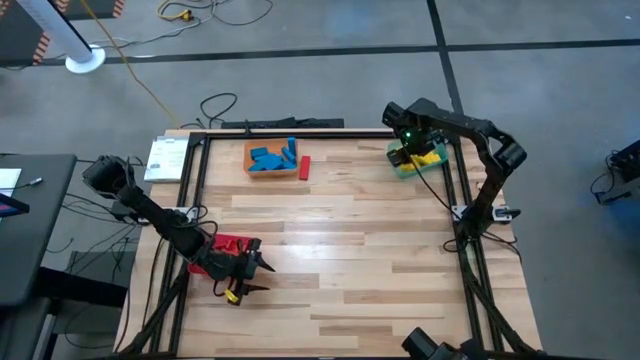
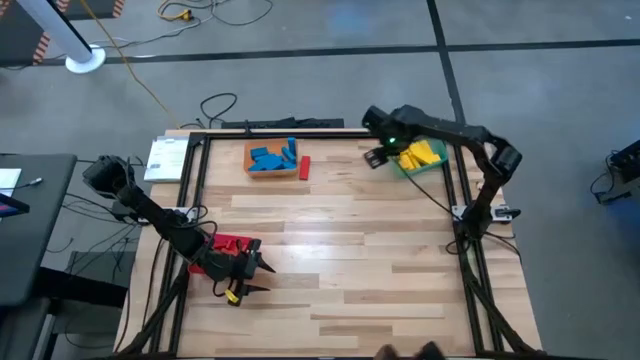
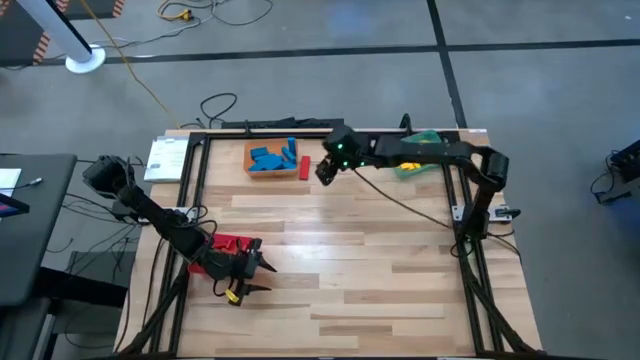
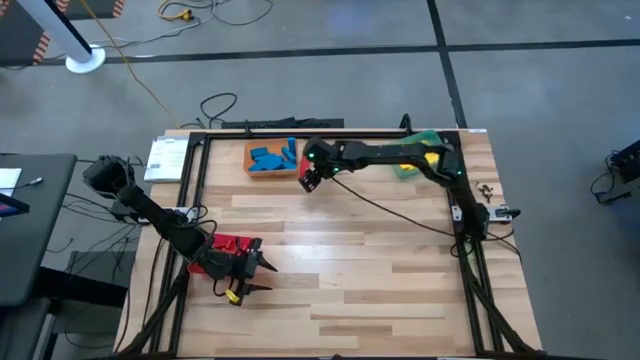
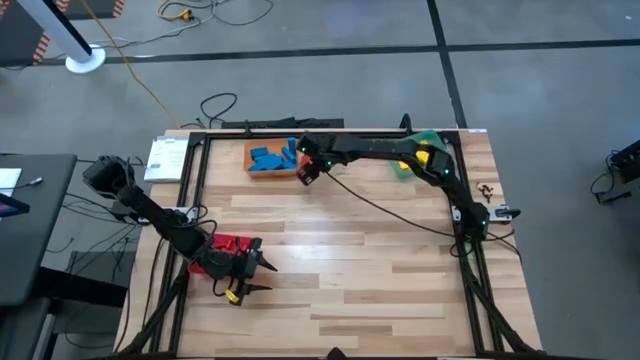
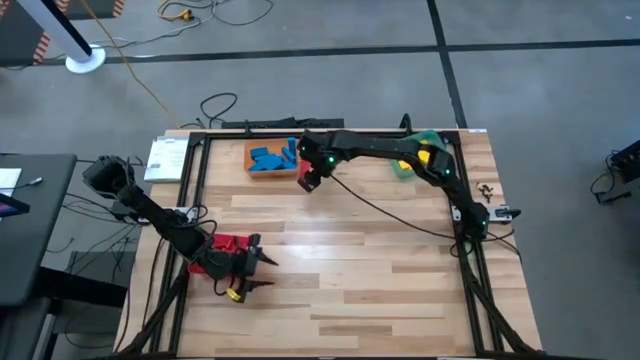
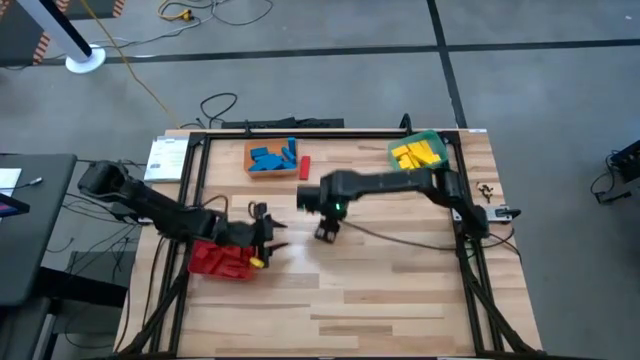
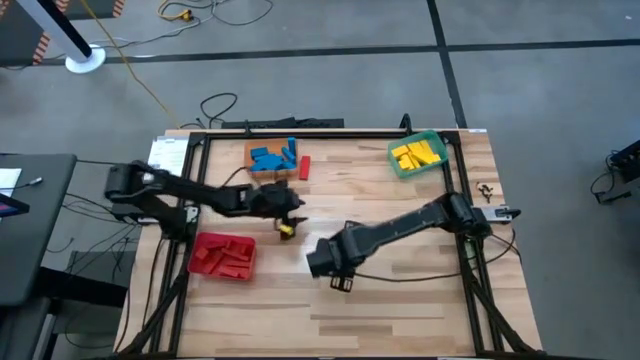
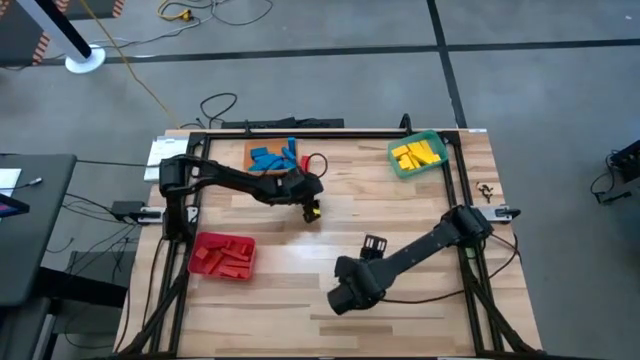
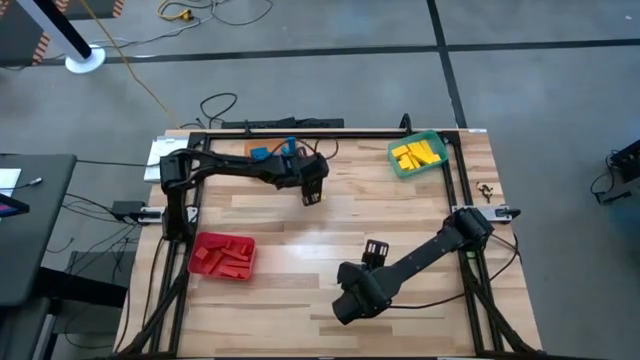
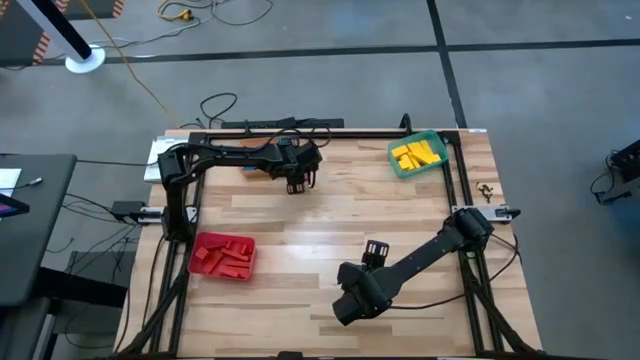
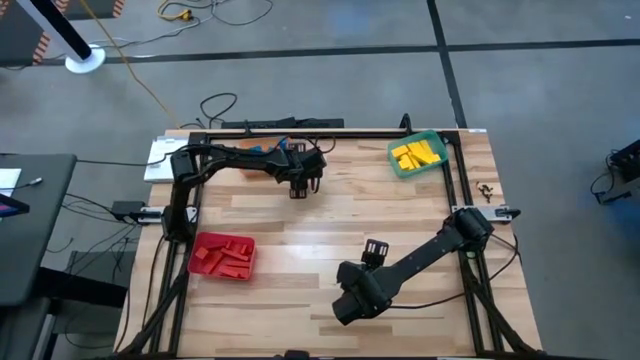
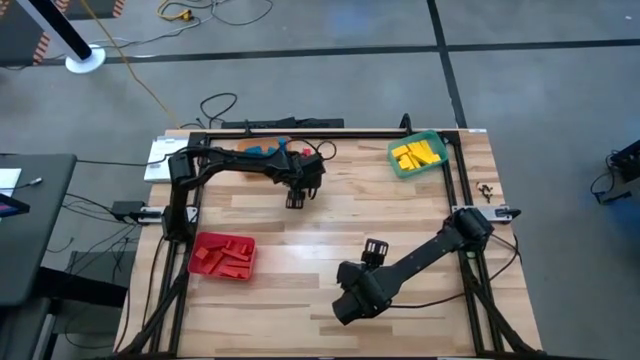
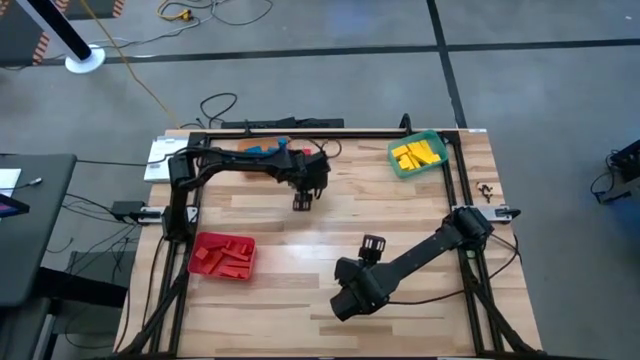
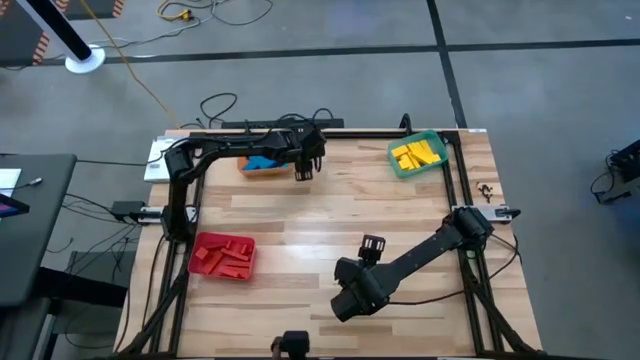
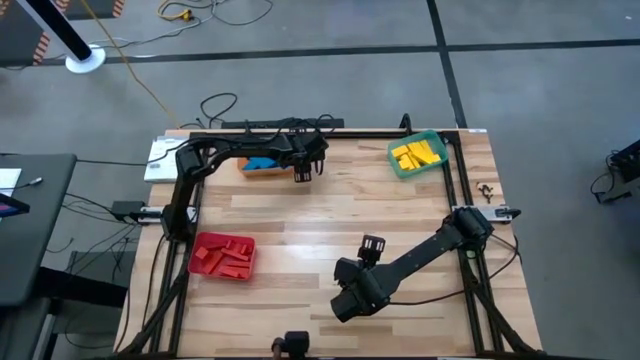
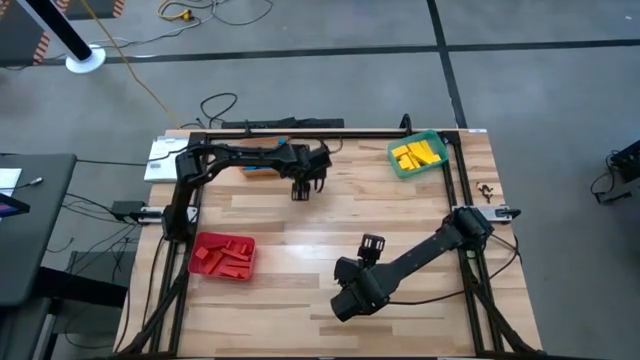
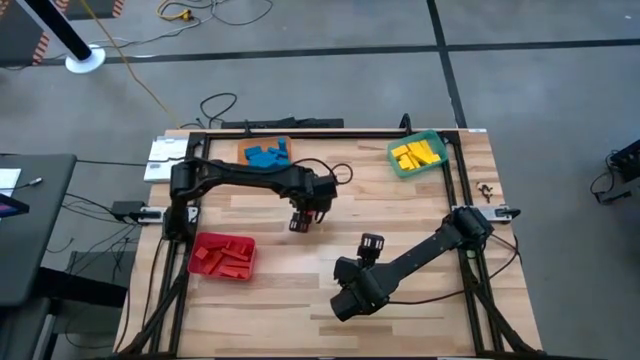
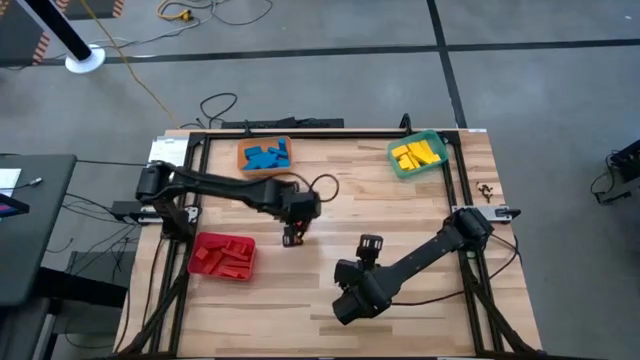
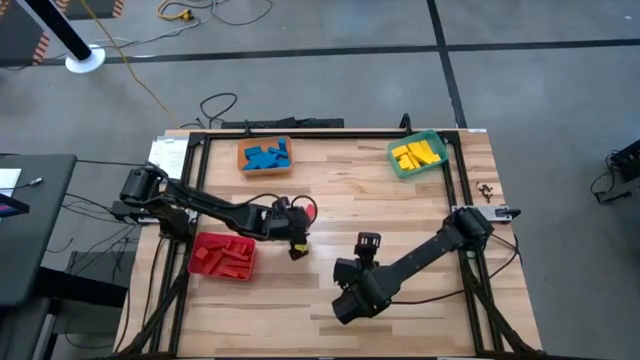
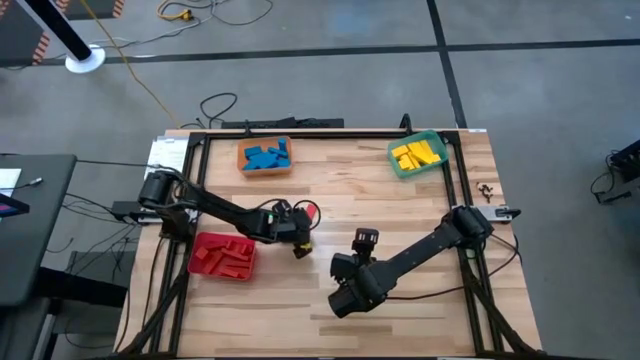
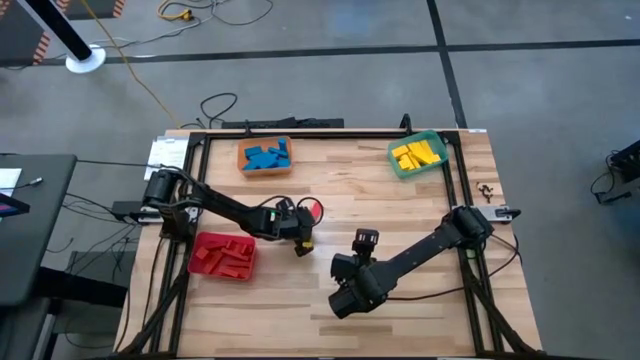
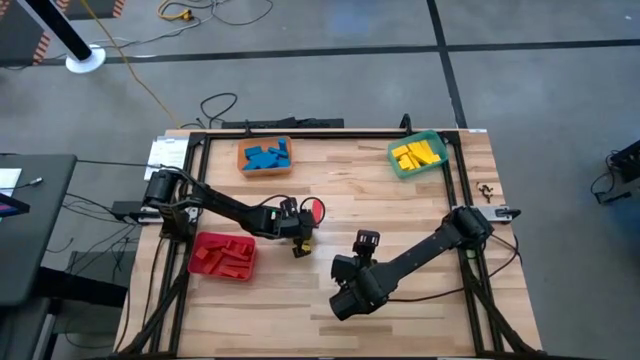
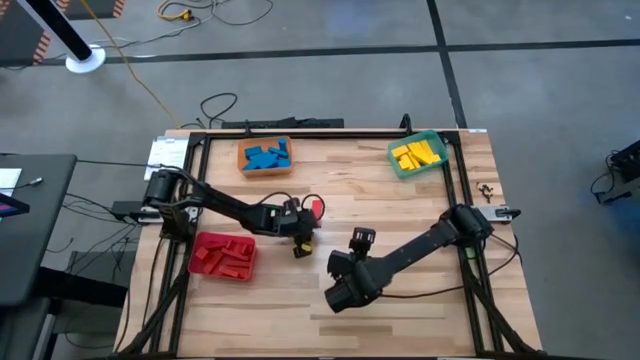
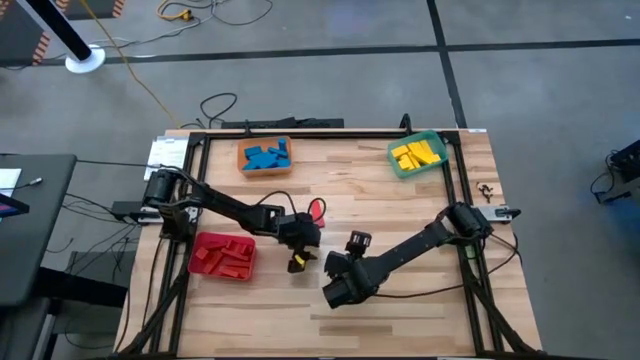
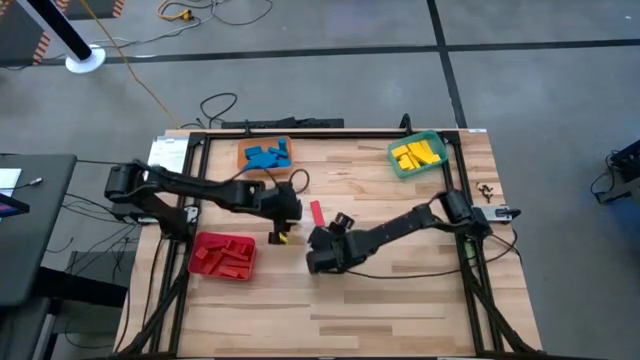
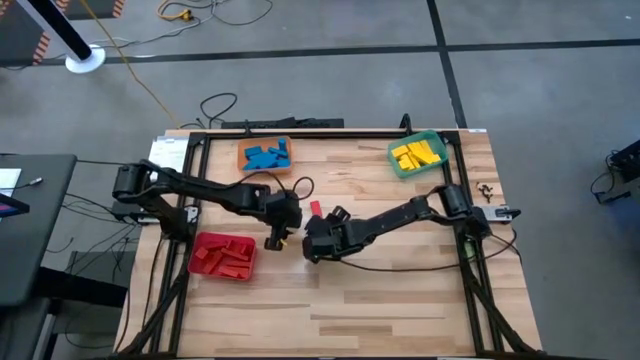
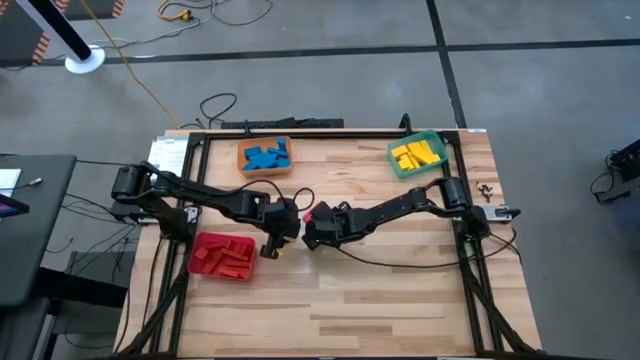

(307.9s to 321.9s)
Task: Sort blocks
Put the red block into the red bin

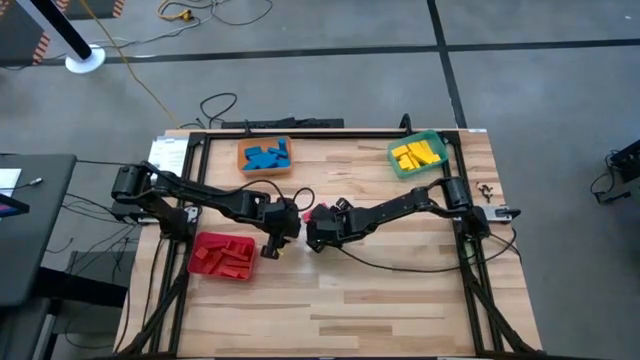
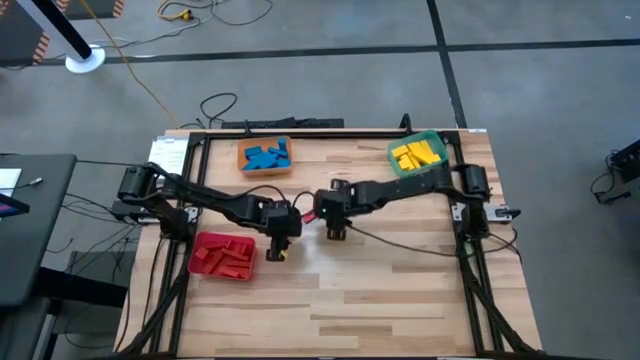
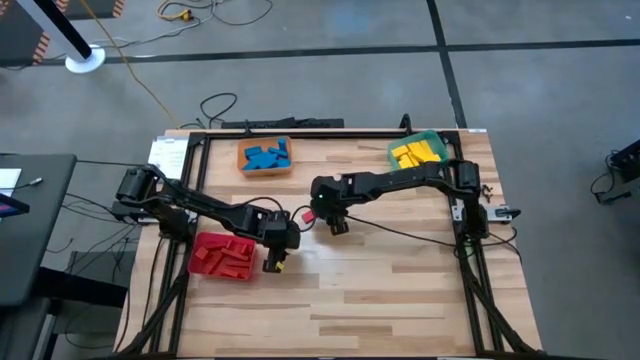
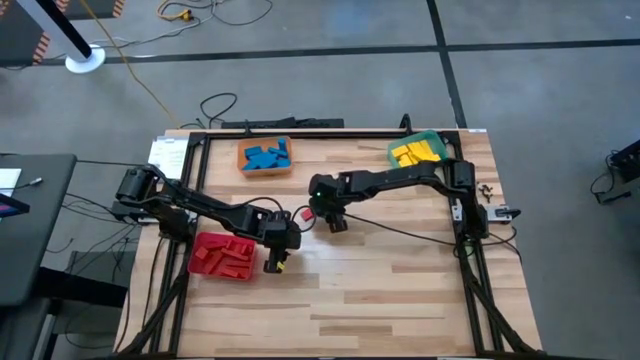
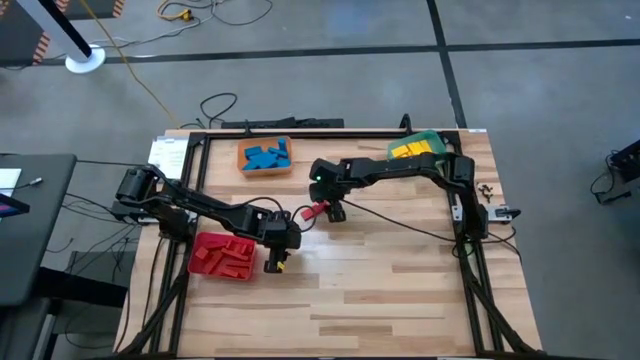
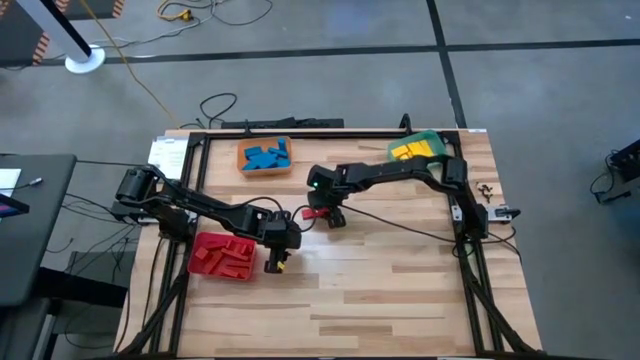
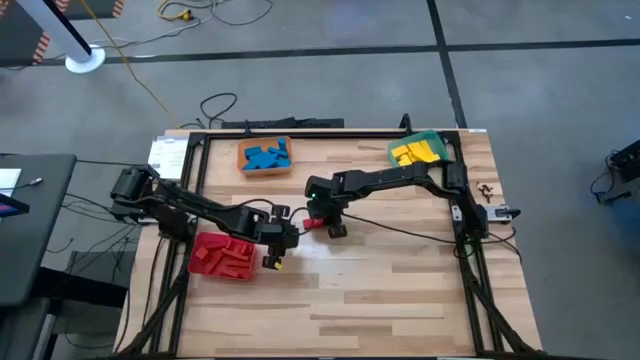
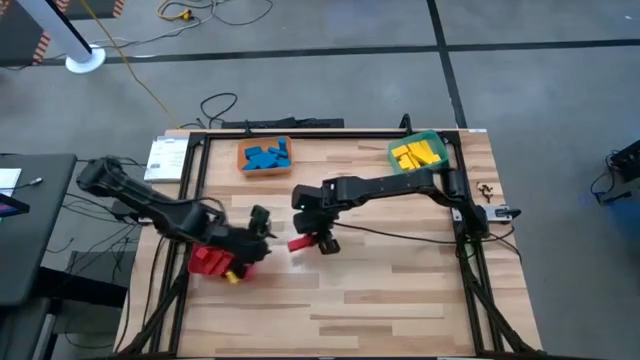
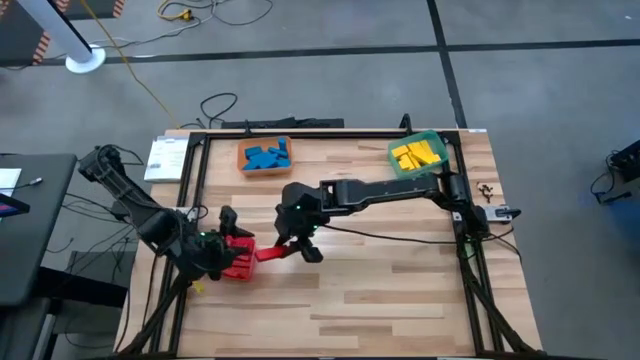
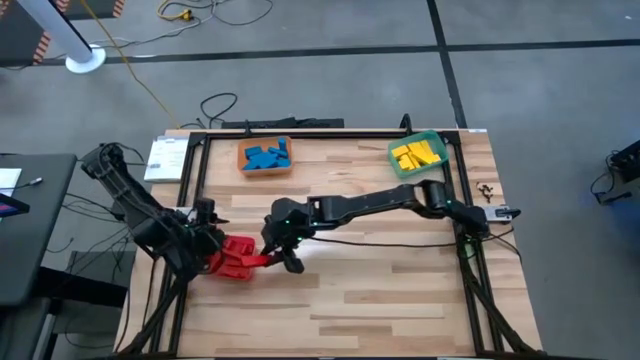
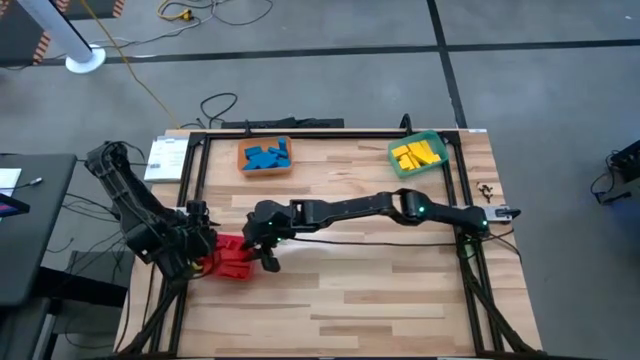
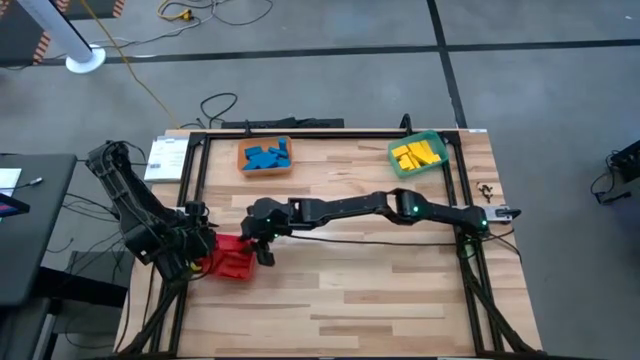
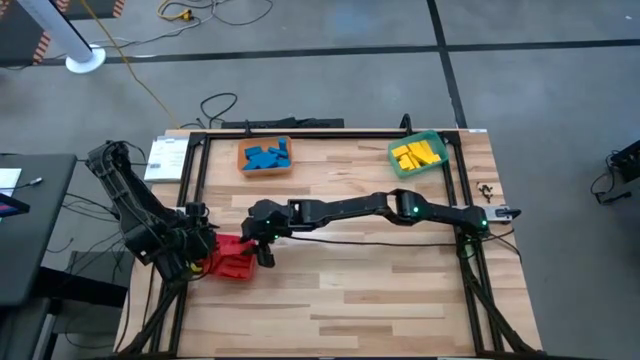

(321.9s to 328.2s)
Put the red block into the red bin

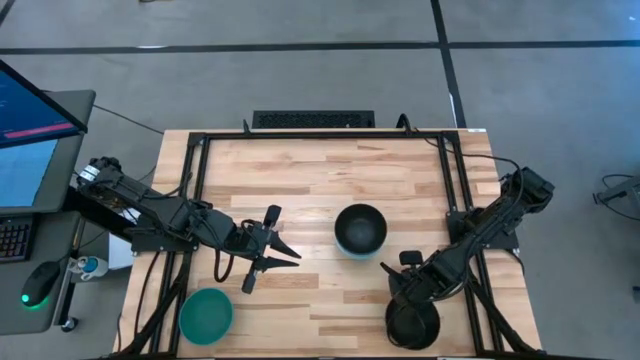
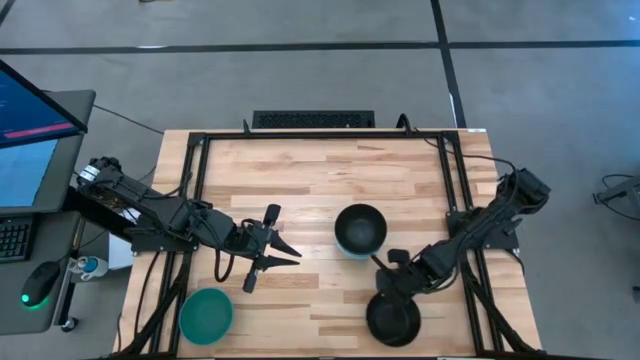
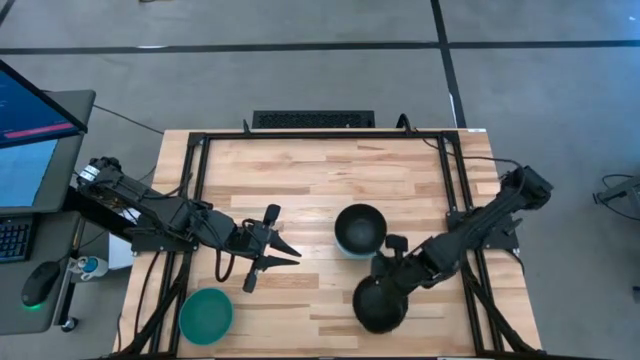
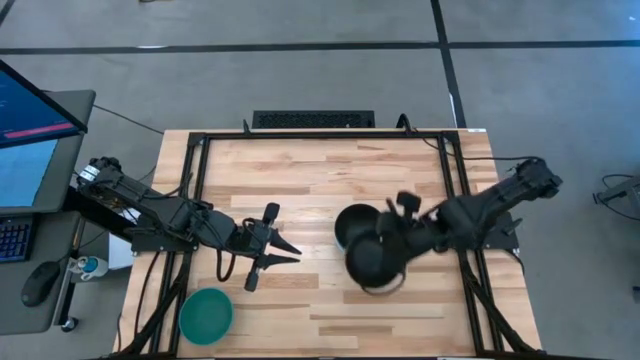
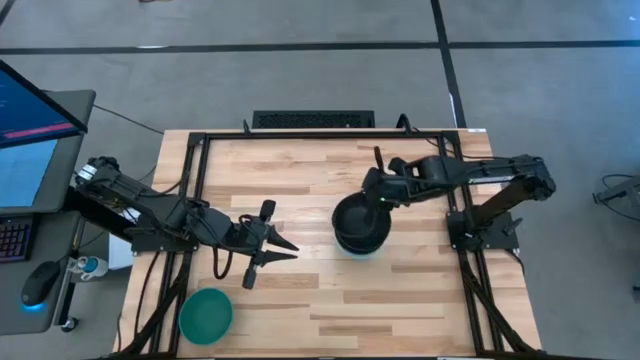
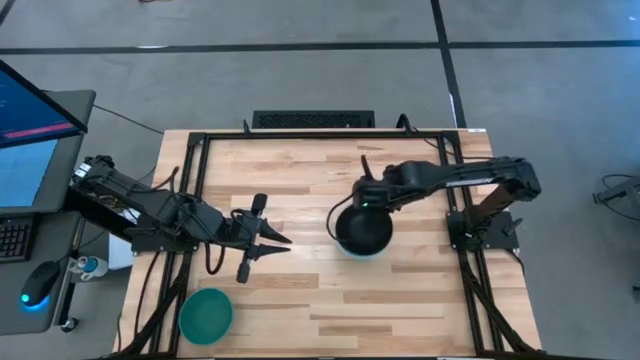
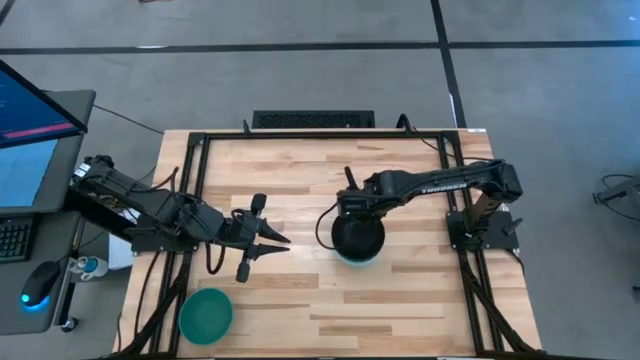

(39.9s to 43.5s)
Task: Nest bowls inside each other
Stack the black bowl on top of the black bowl
